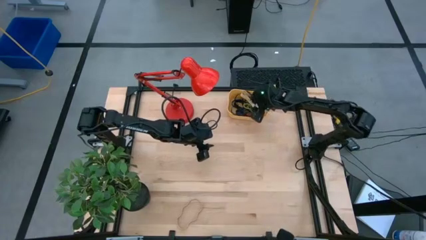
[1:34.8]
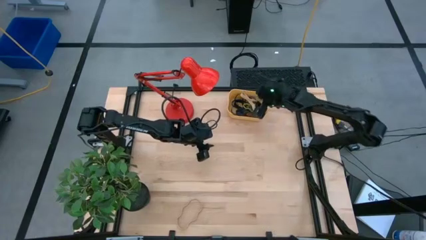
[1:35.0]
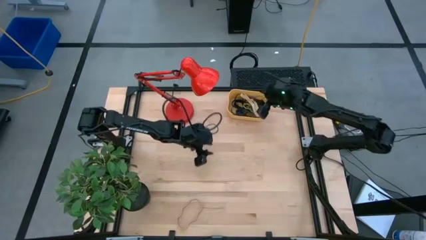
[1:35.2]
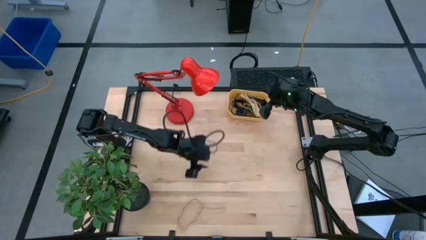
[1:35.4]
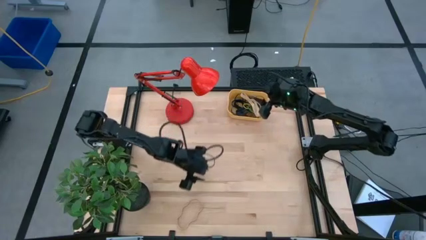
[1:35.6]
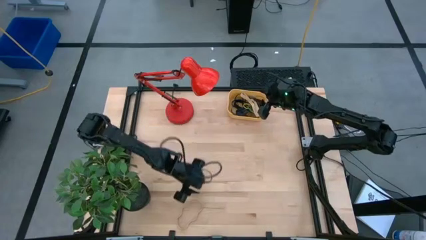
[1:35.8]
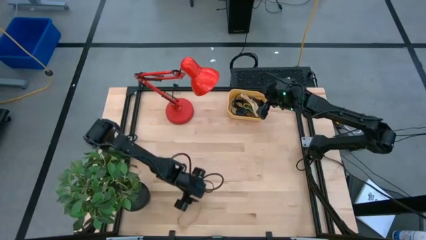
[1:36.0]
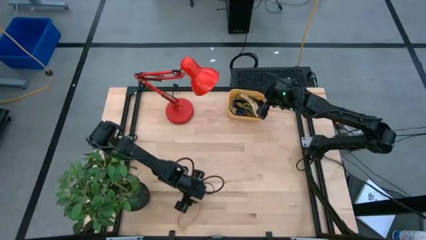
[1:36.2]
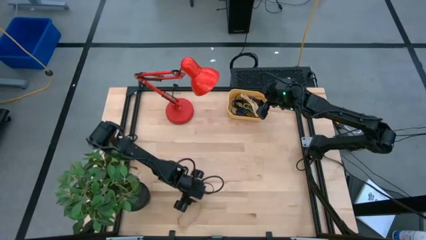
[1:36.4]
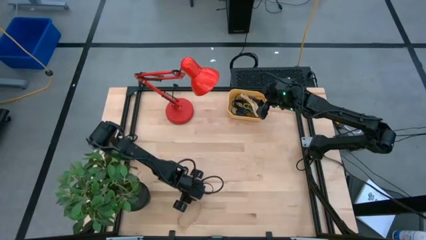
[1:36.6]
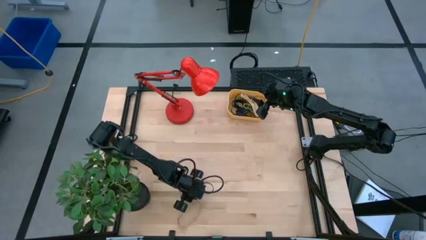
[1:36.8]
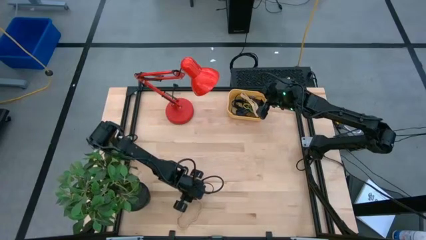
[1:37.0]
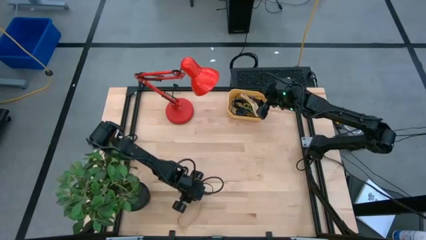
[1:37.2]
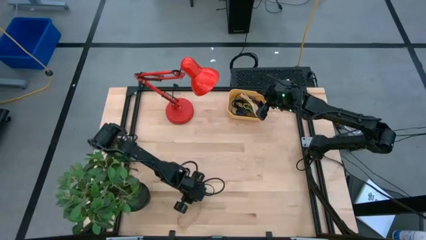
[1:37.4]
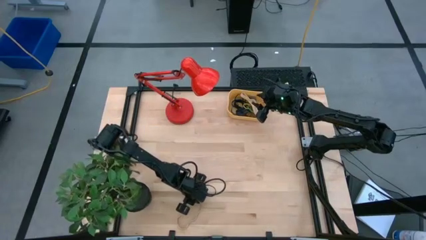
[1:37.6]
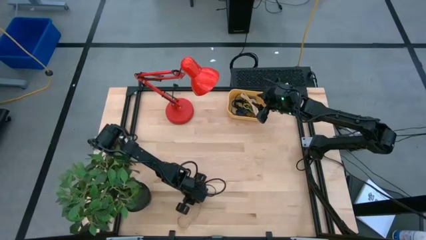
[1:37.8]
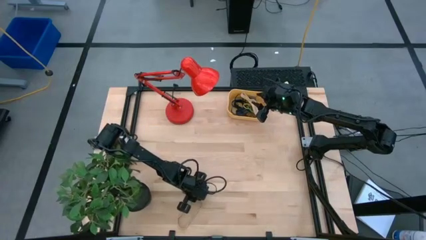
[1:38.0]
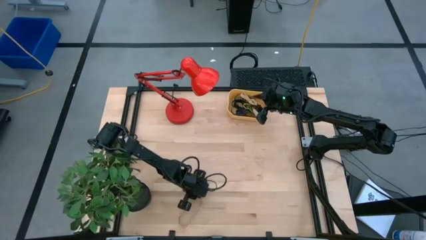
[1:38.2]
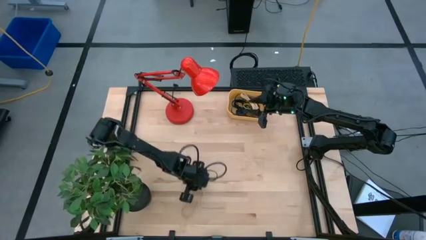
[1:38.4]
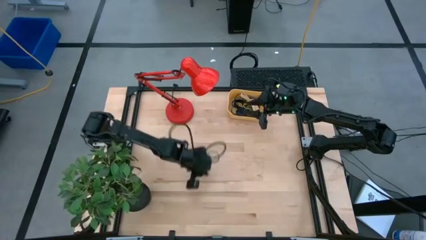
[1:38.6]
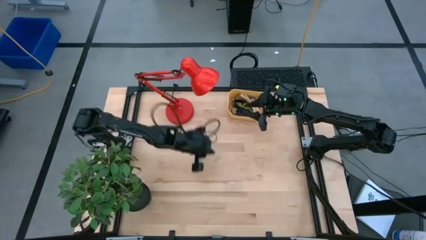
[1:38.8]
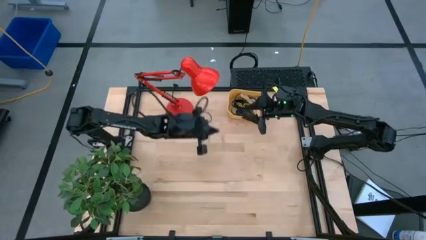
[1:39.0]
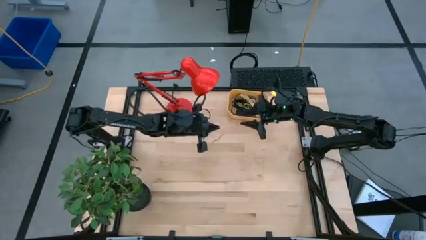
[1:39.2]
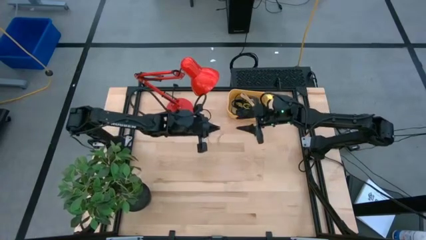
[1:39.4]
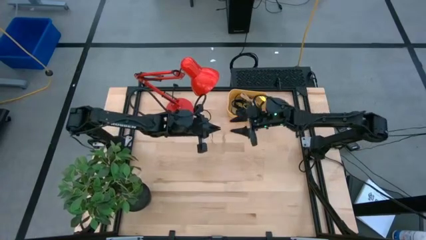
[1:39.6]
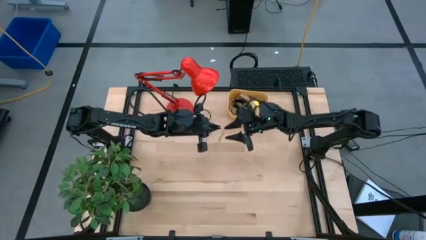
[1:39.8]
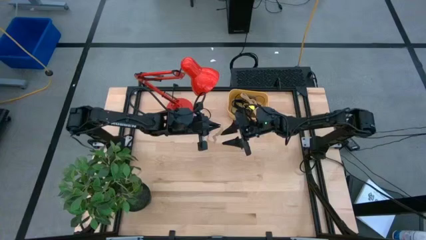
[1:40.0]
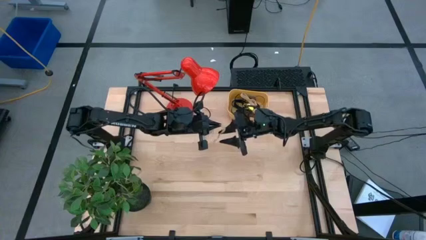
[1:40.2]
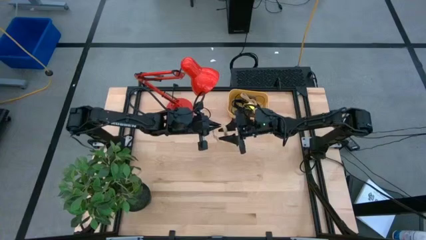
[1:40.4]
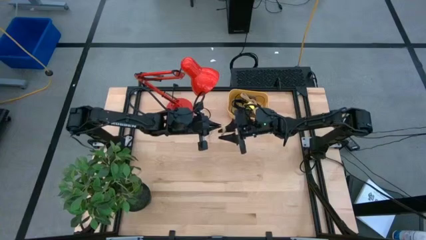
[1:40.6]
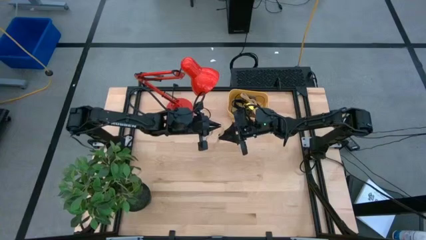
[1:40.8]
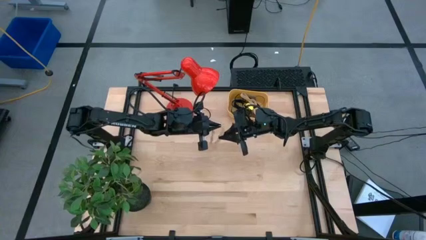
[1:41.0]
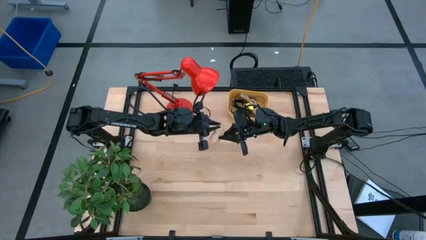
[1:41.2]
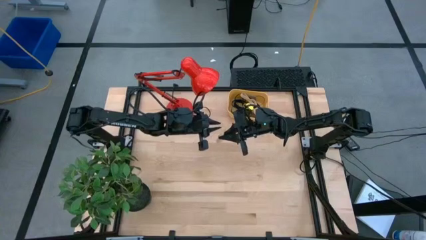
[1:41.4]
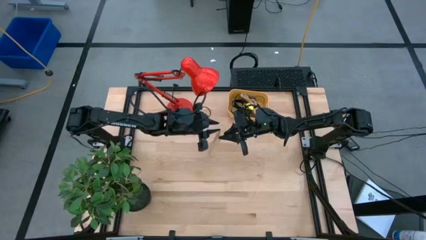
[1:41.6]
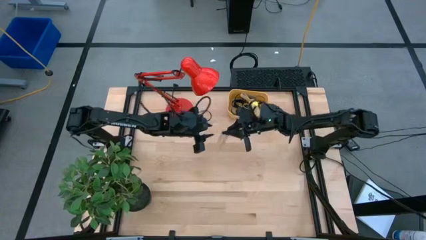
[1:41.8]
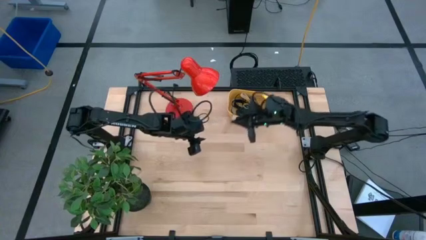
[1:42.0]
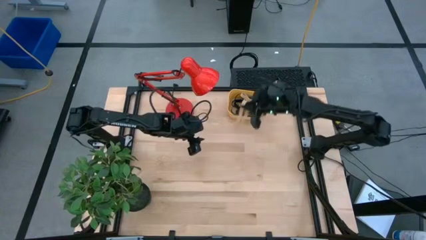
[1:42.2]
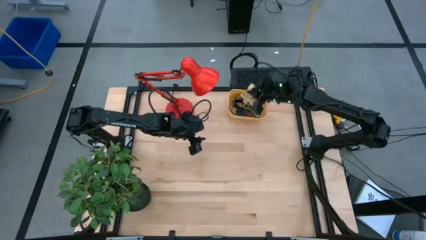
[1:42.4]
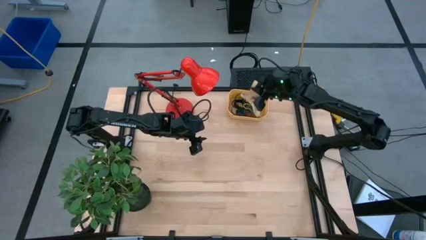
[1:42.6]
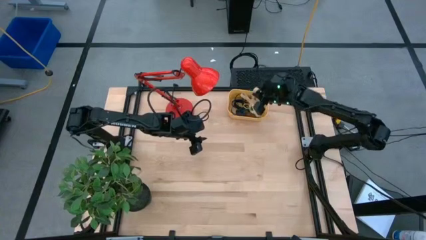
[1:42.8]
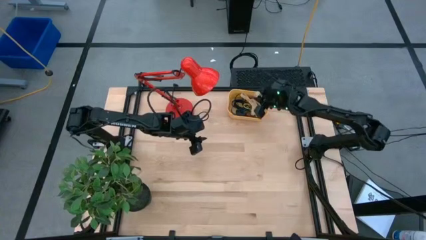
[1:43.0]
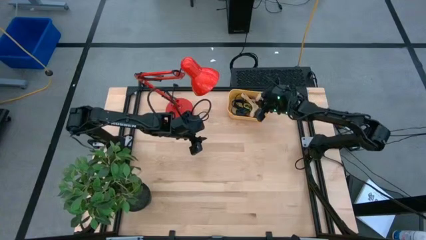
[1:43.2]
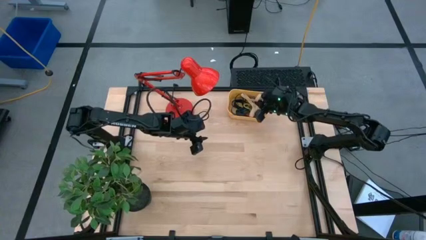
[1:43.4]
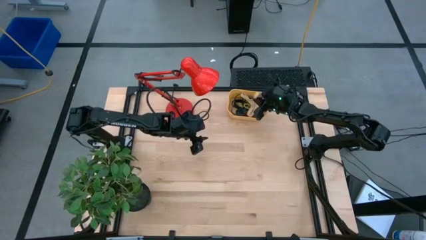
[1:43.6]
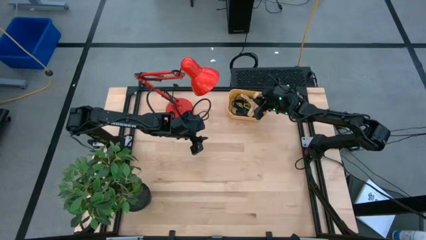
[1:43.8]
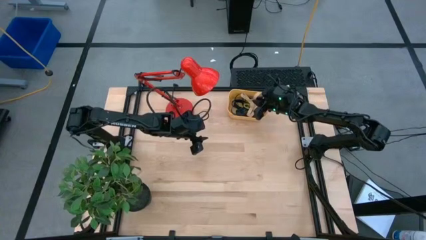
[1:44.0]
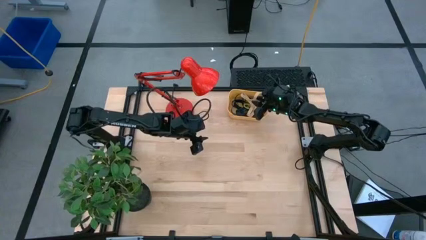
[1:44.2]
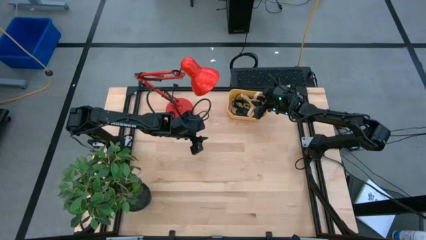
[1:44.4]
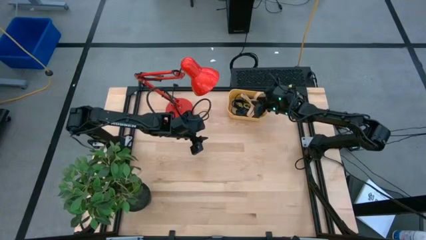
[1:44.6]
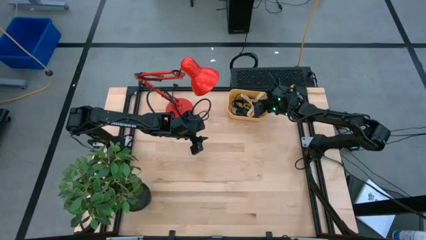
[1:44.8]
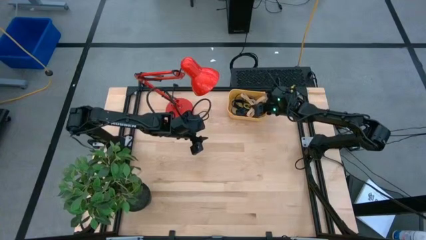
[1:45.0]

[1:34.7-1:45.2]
Task: Pick and place rubber bands into bin
Put the white rubber band into the yellow container

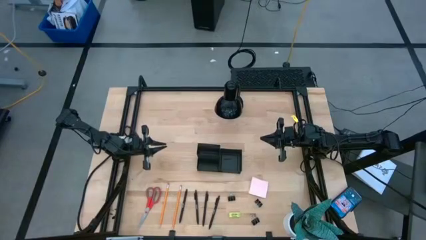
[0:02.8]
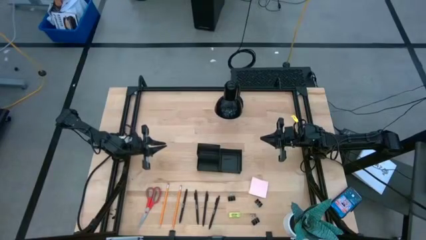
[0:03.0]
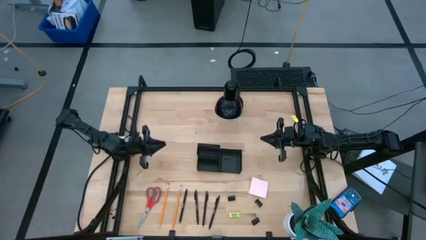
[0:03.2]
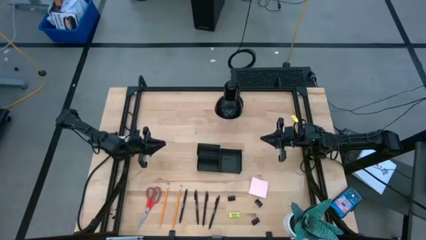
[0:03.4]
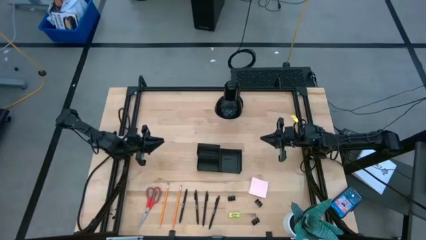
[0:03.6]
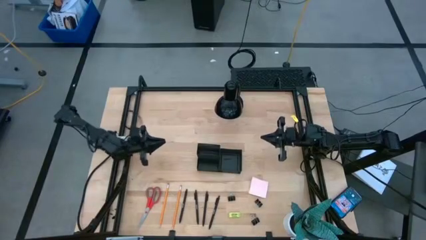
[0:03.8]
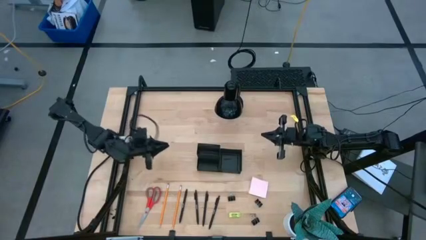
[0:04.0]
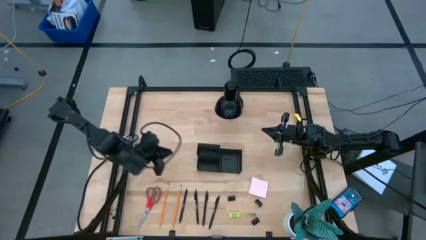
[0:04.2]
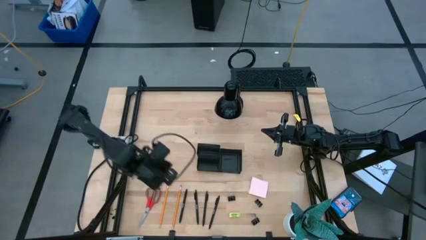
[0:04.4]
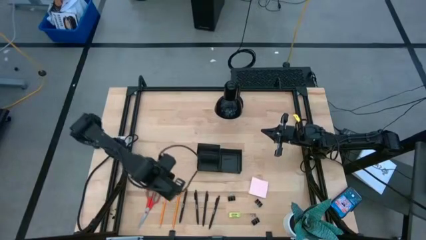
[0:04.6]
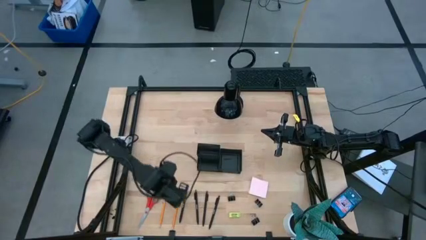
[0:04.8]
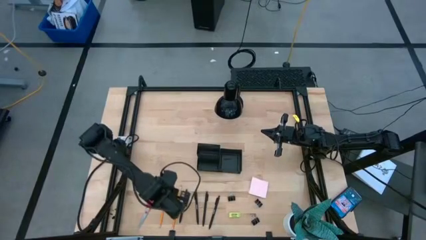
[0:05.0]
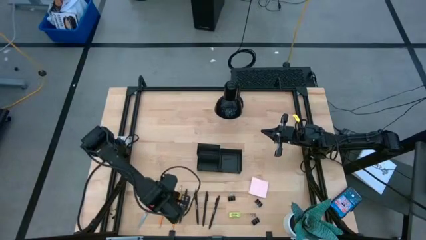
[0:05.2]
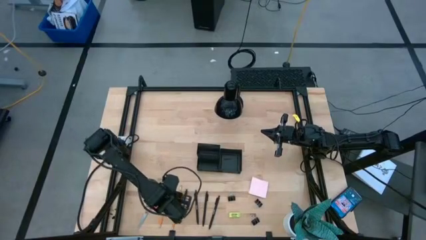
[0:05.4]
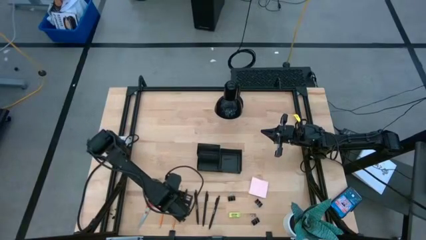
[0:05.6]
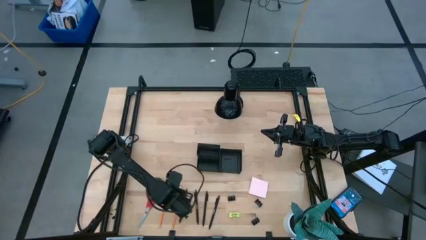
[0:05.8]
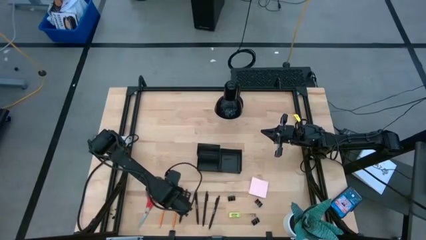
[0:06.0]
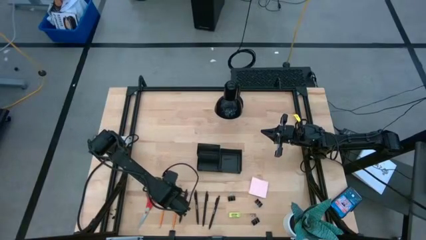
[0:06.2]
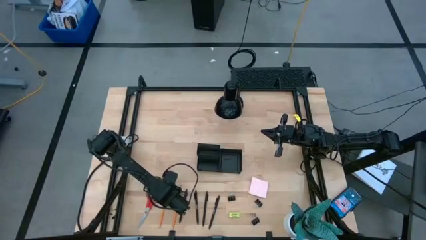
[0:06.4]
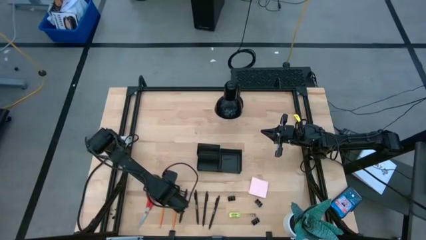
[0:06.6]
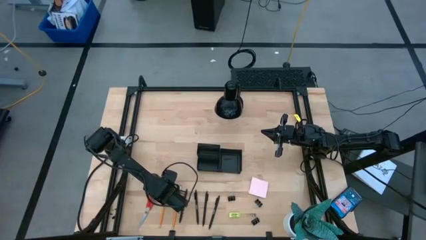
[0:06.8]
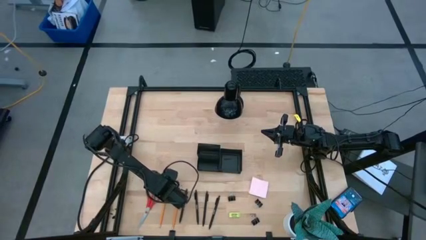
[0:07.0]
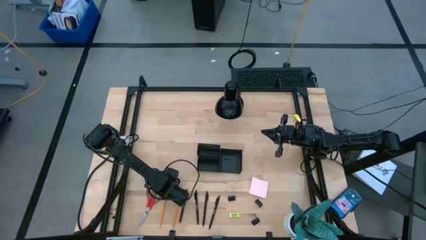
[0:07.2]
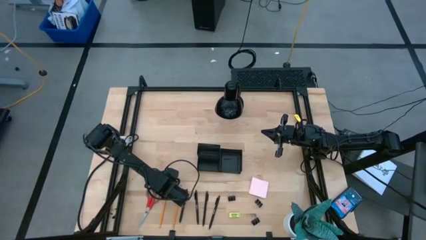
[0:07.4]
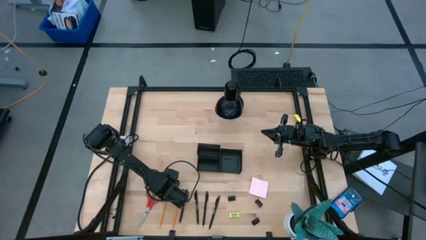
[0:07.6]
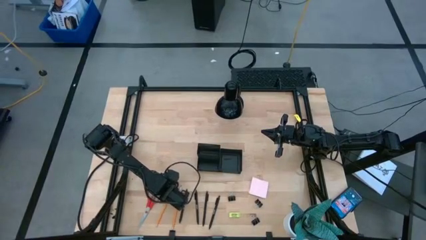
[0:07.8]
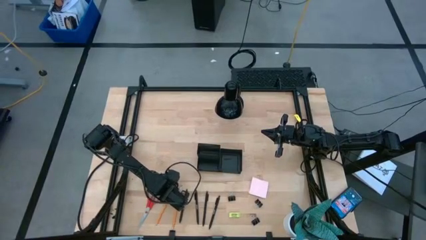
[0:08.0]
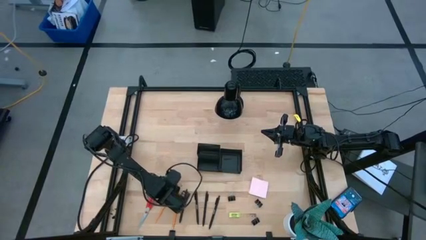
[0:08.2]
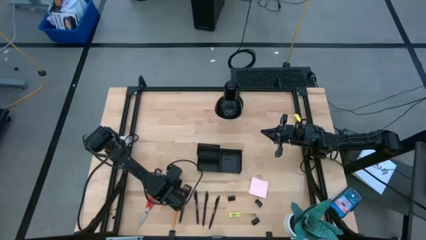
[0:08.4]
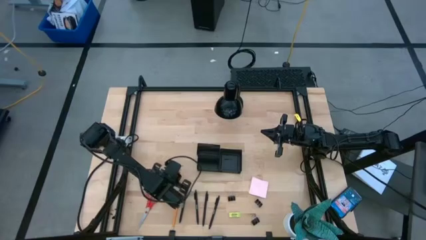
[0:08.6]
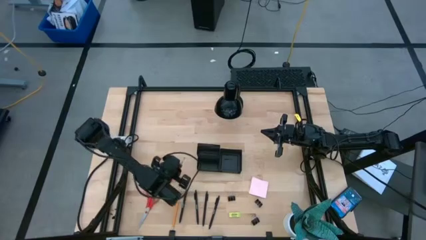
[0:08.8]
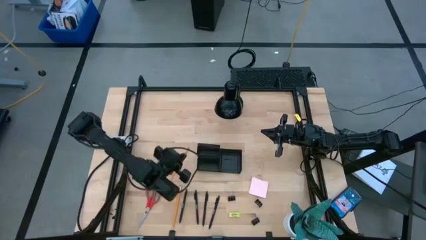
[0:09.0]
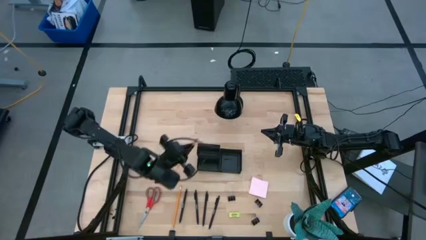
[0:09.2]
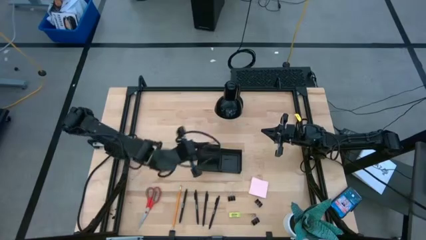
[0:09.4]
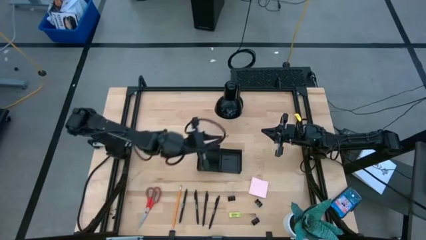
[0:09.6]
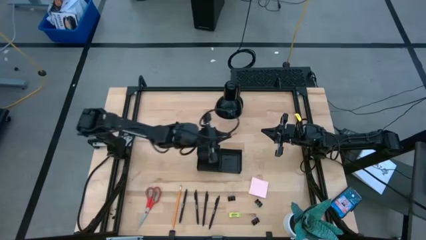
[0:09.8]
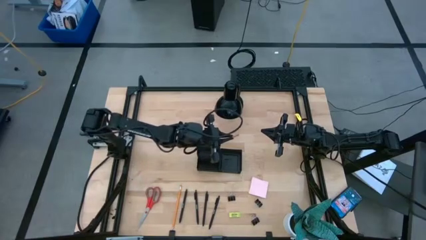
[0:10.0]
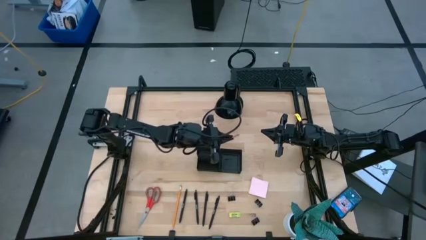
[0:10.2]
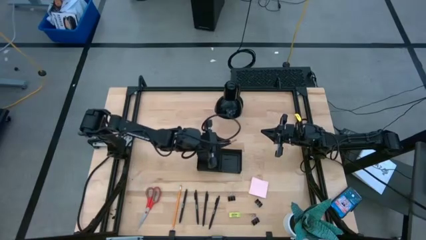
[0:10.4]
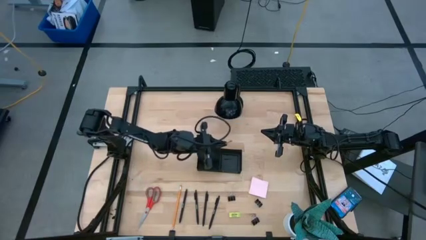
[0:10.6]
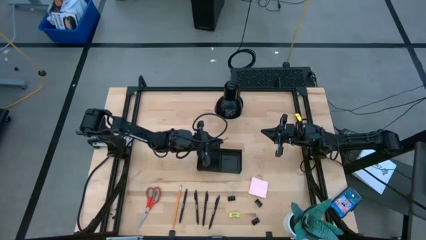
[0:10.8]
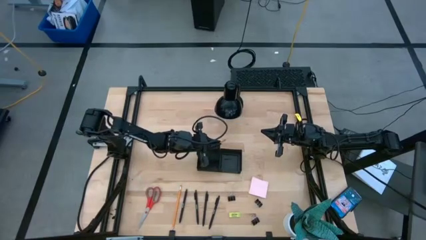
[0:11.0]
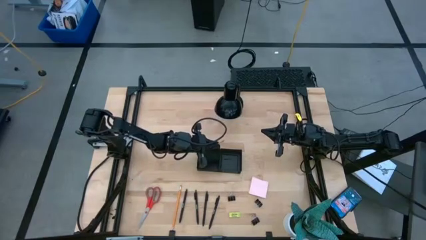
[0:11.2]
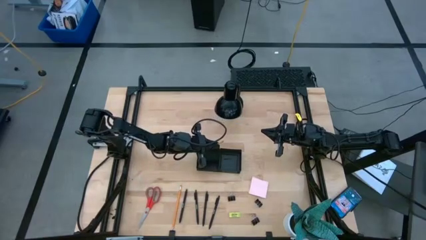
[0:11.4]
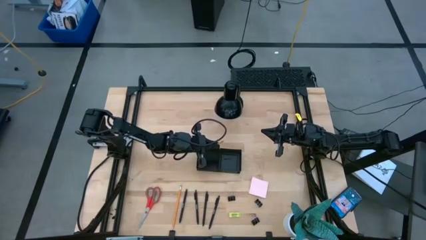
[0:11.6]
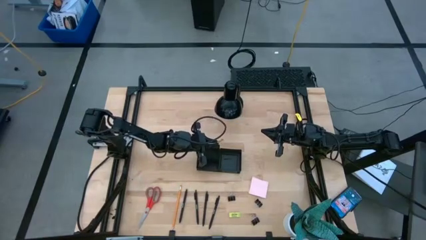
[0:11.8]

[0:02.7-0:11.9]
Task: Pick and place office supplies into organizer
Put the orange pencil into the black desk organizer
